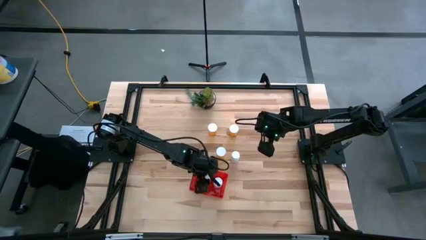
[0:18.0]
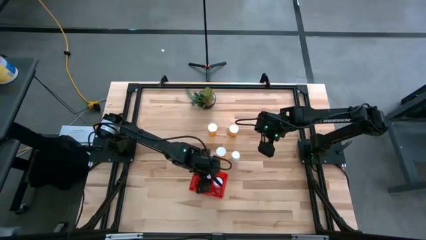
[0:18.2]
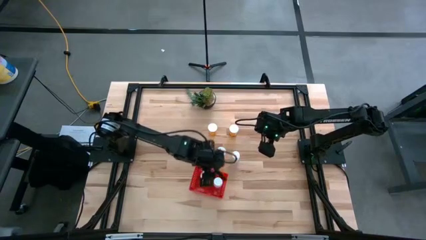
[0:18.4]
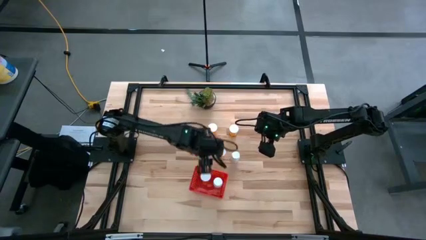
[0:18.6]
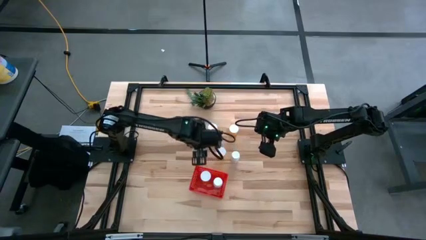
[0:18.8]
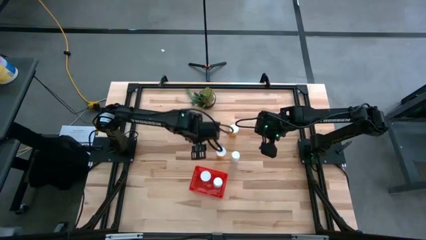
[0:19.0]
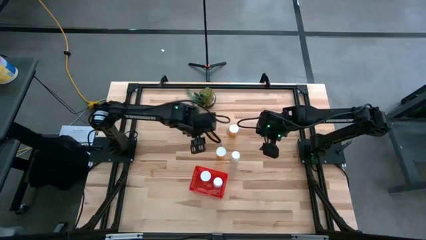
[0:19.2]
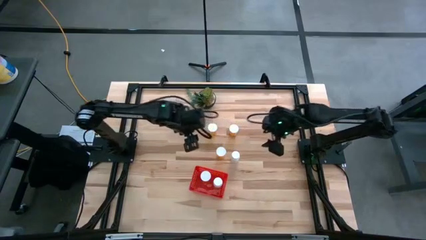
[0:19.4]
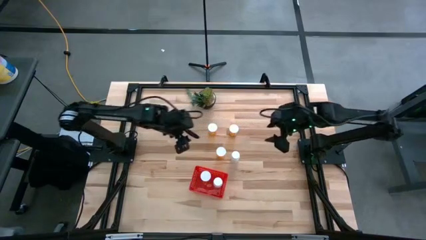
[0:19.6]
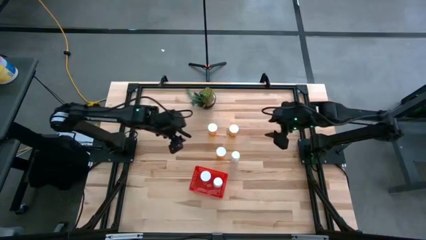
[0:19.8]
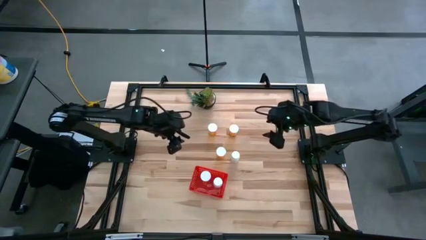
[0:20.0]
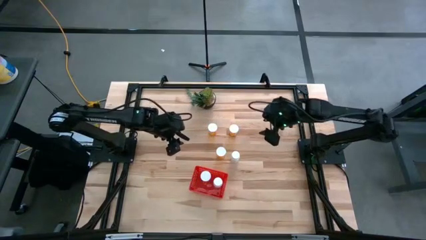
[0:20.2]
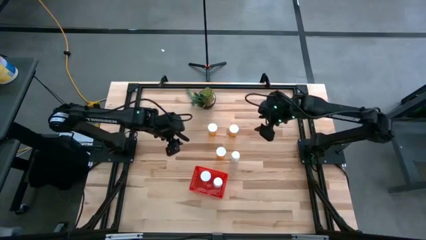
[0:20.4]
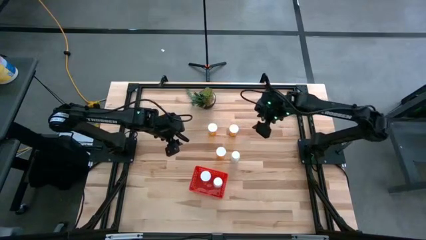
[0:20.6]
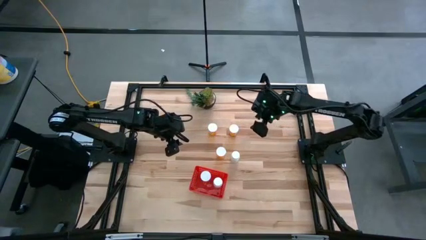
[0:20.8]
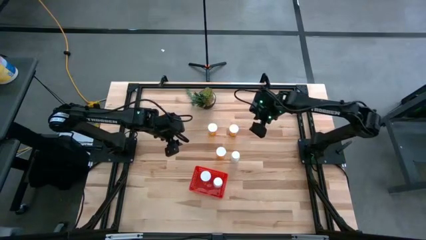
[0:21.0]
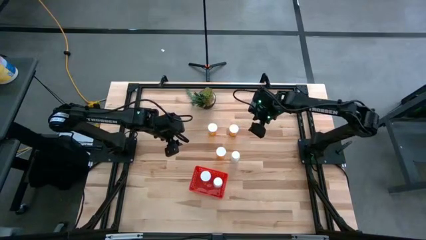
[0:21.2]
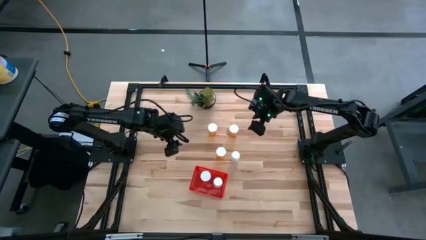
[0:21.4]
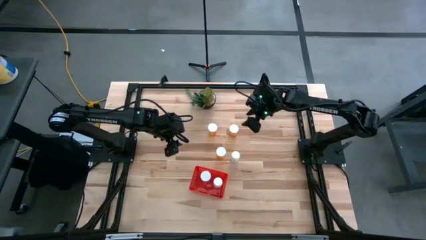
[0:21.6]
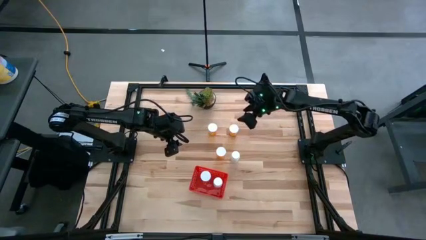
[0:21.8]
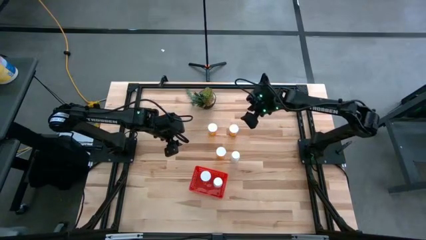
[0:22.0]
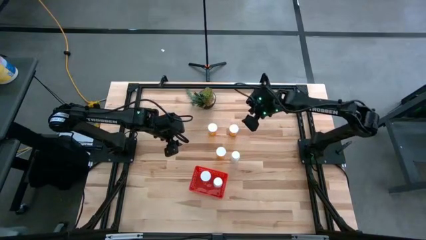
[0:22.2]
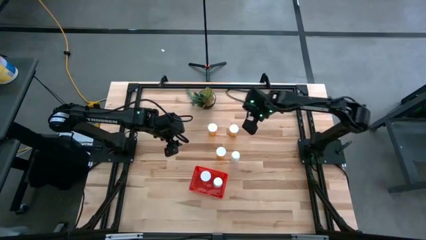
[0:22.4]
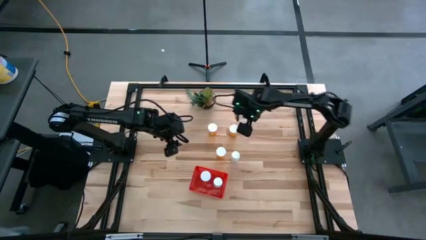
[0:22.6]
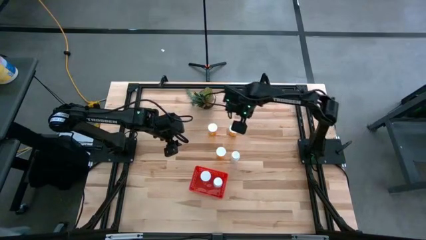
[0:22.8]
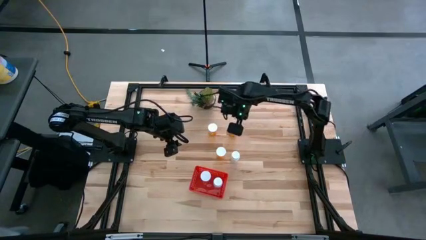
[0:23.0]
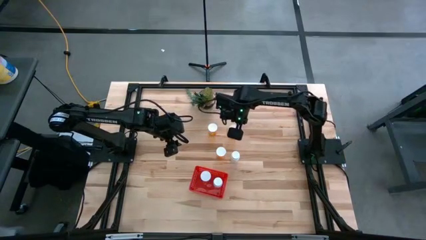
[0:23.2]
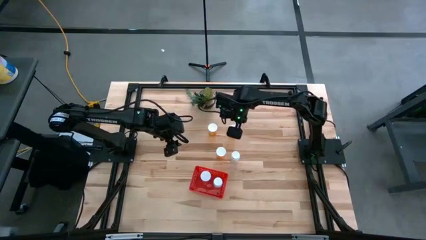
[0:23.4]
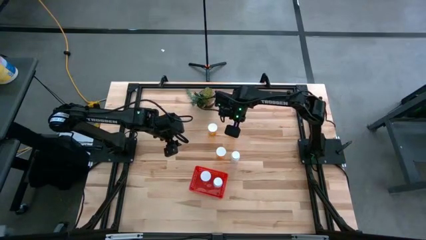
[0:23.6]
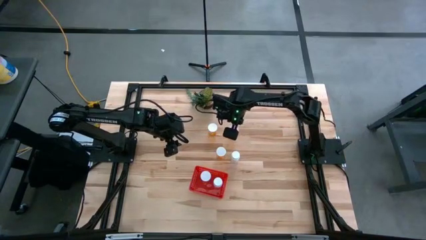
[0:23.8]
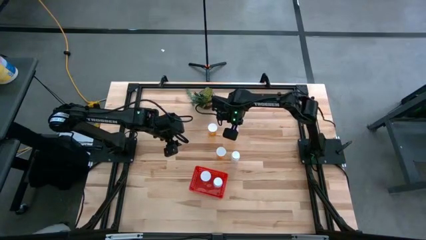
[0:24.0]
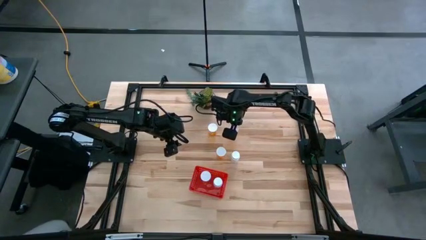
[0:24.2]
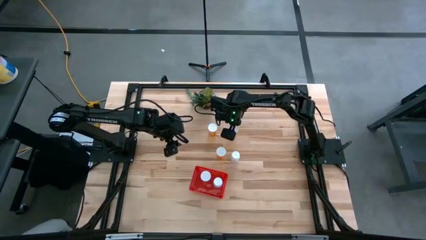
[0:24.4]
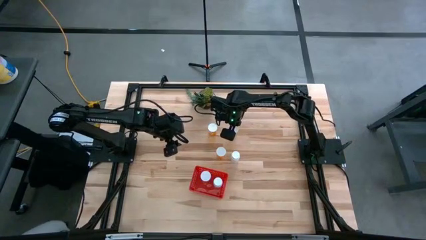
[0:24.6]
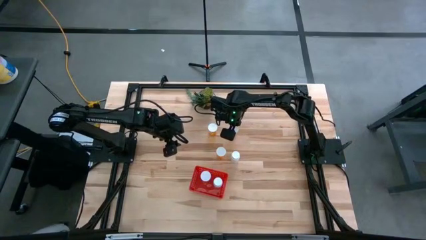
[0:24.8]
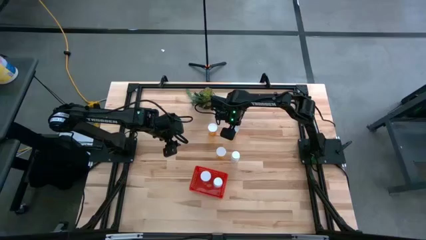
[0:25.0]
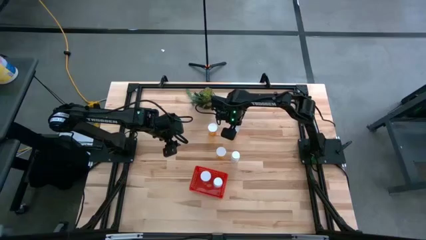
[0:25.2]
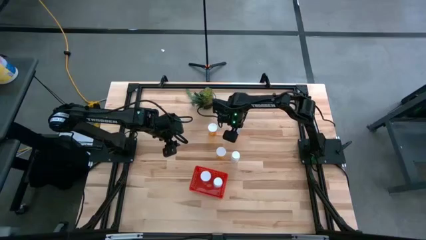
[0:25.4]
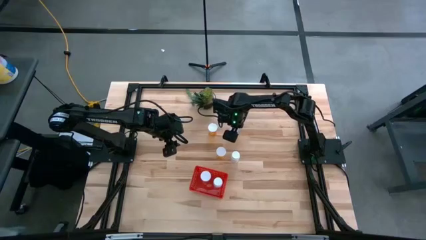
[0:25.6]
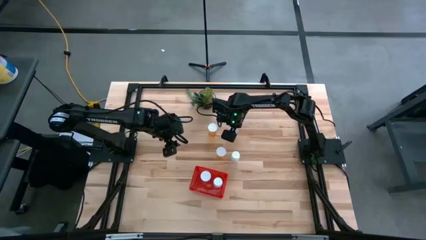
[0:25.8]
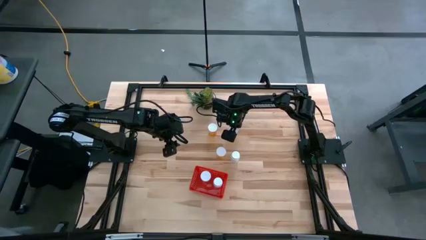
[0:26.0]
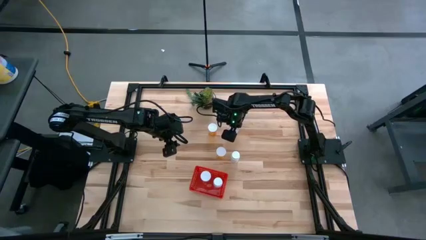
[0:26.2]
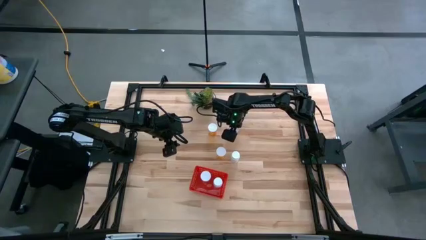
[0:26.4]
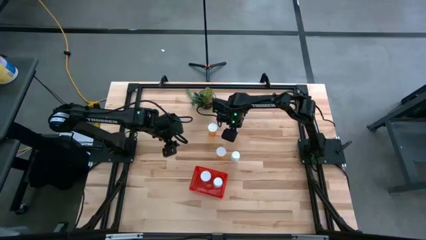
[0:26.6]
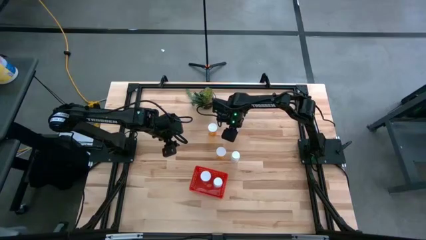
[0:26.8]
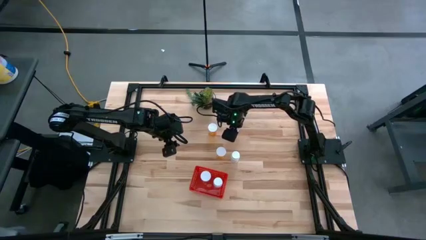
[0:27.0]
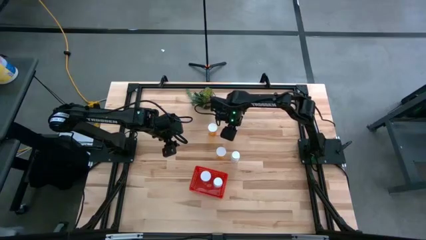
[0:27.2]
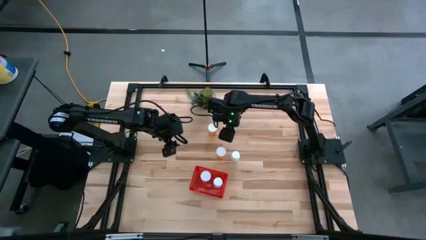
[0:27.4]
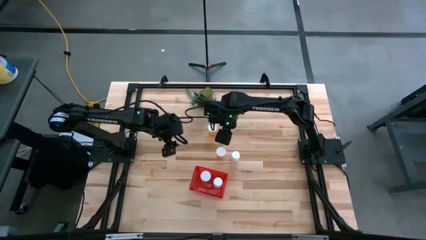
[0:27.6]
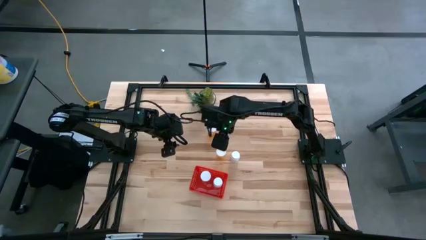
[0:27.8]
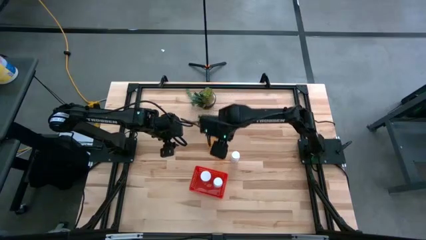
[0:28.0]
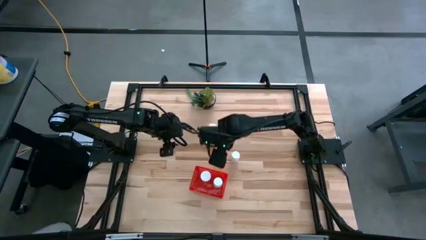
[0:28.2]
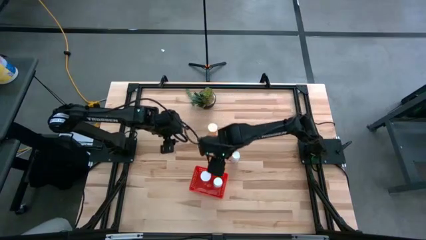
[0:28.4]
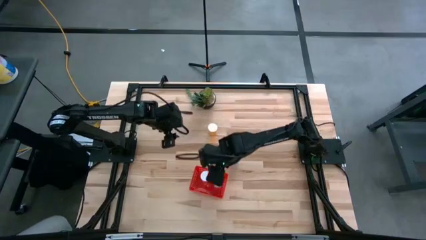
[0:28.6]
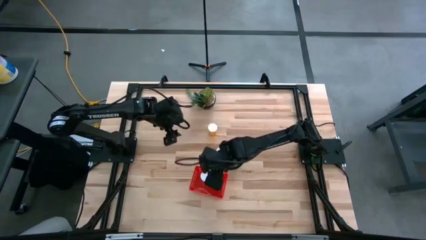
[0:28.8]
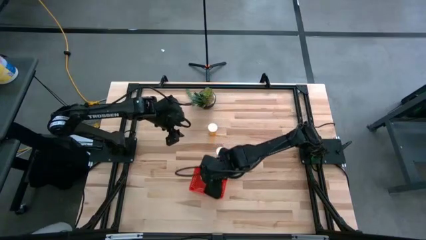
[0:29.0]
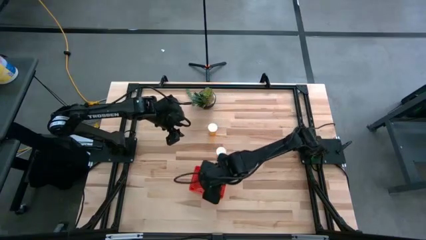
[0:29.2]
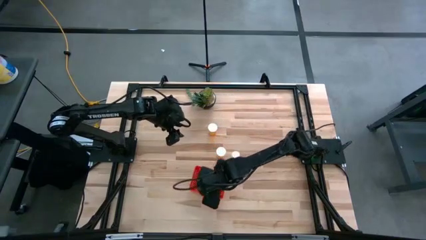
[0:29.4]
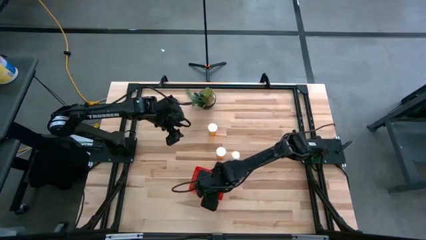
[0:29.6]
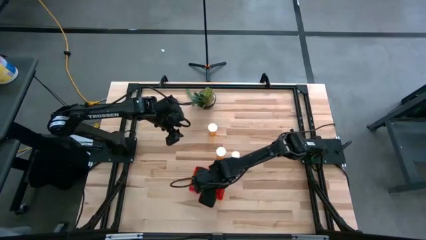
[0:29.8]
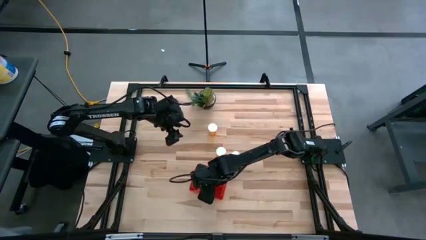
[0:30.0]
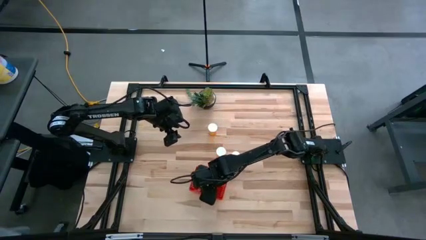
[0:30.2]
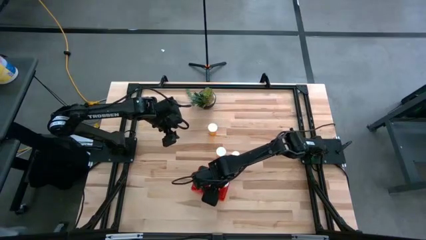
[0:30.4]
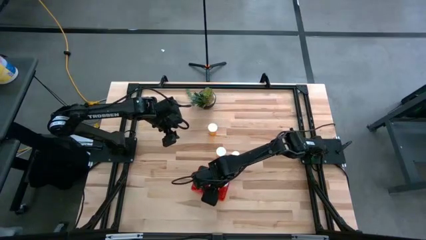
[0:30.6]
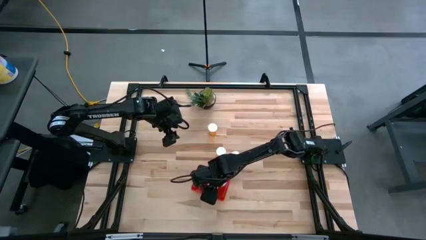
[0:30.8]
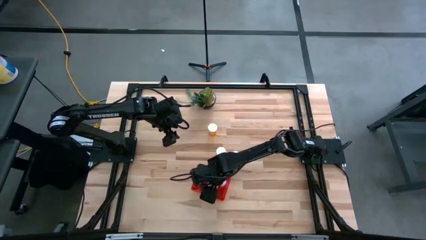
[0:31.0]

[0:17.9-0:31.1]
Task: Pick and place pill bottles into a basket
Put the top right orange pill bottle into the basket

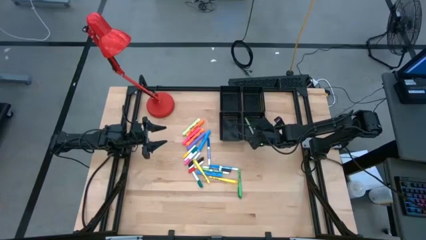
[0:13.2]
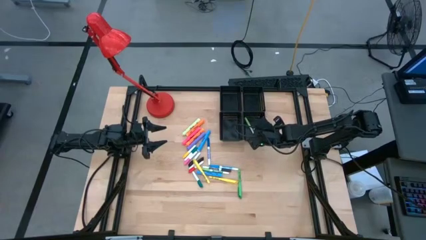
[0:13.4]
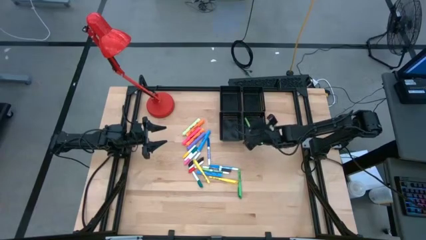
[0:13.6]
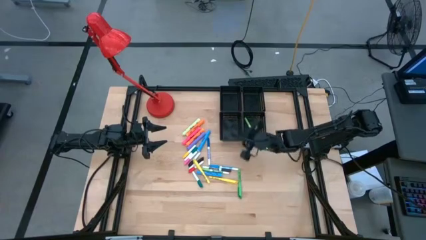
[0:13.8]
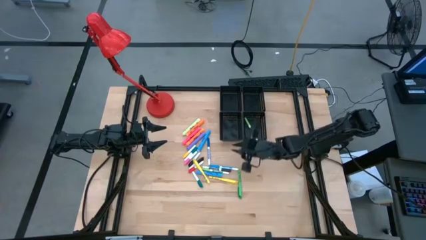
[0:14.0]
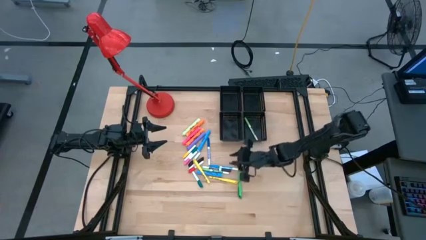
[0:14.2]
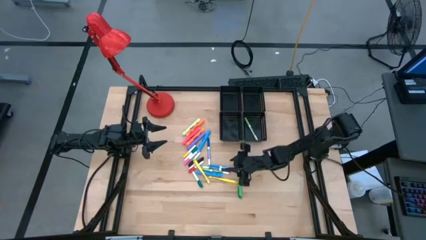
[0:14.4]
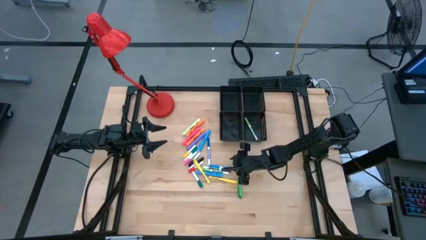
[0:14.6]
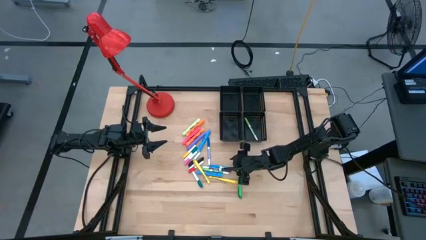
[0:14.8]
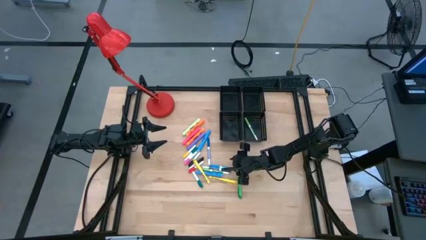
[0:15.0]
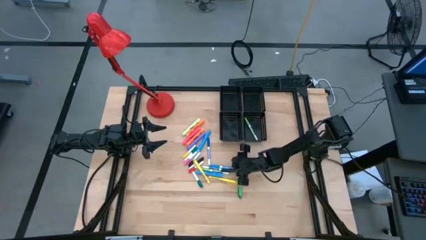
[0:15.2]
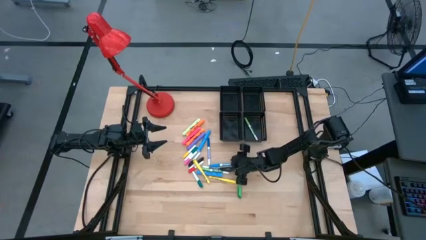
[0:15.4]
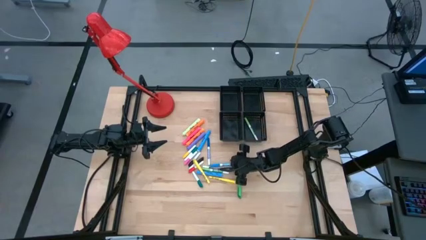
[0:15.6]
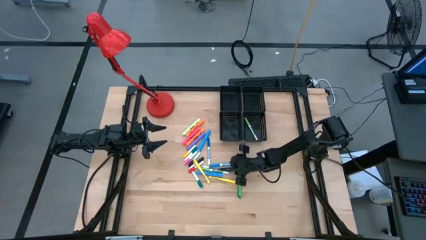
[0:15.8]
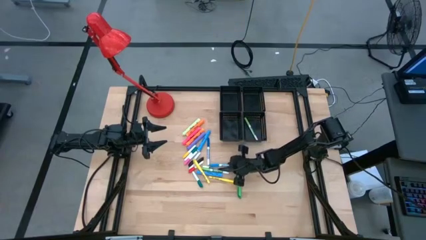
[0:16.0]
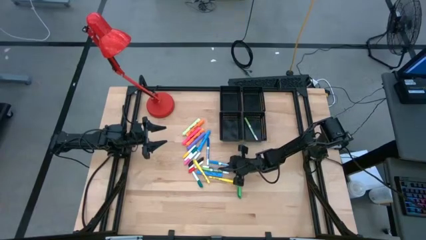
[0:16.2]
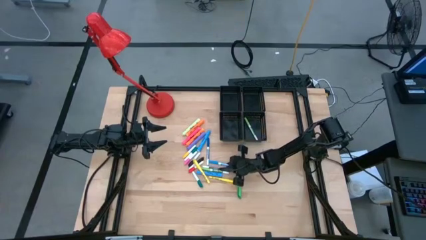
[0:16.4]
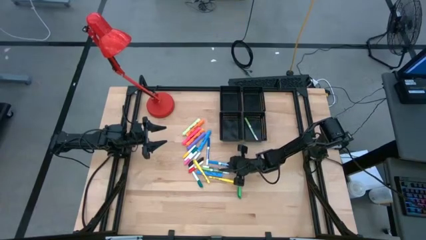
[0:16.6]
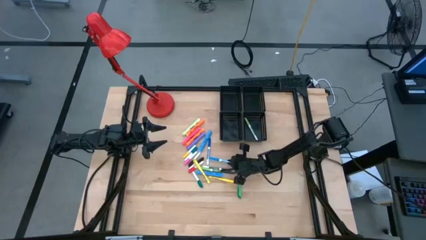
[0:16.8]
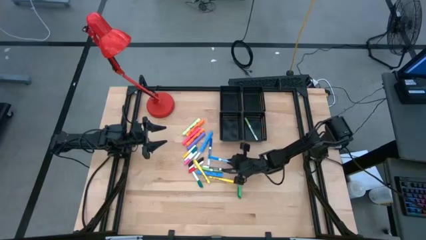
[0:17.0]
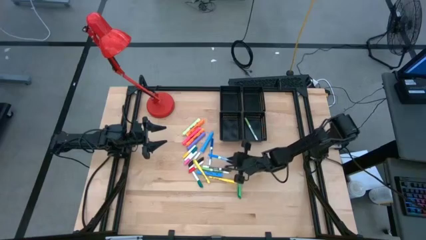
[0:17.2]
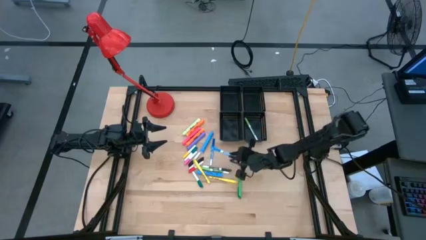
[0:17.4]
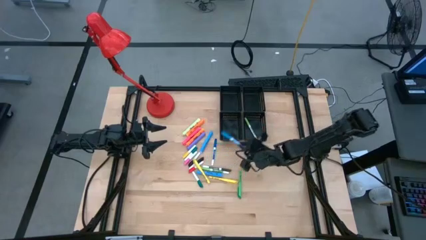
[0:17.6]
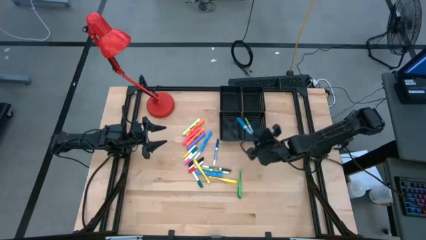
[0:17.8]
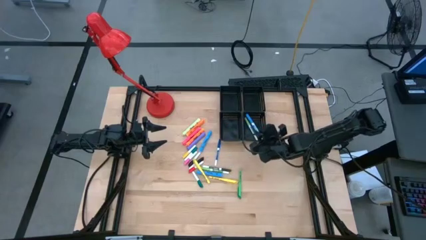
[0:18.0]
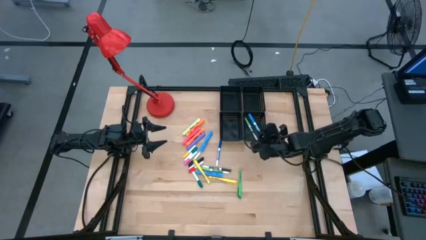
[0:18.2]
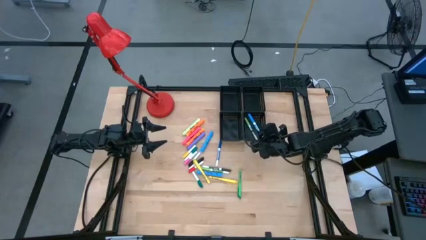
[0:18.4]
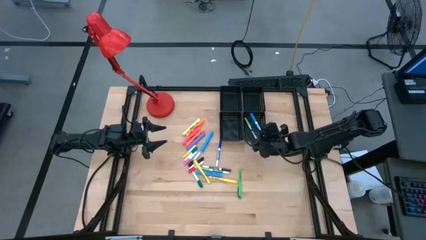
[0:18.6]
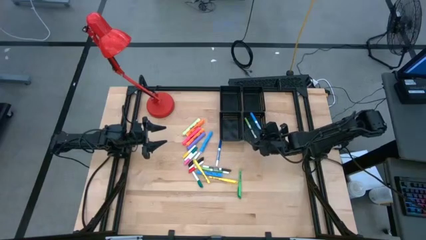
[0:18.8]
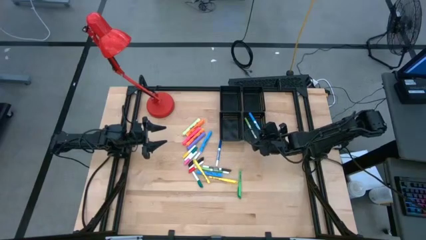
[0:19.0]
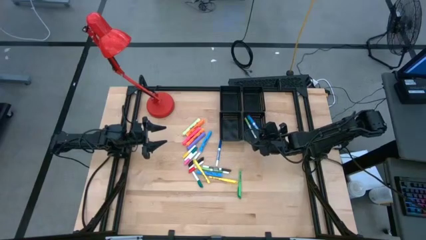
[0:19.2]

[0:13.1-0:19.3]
Task: Pick & Place Markers
Put the blue marker pen into the bottom right black bin
